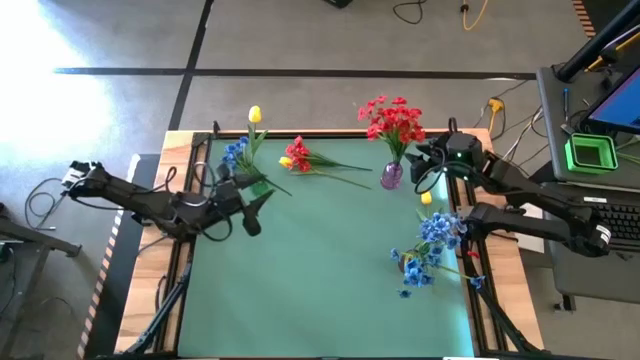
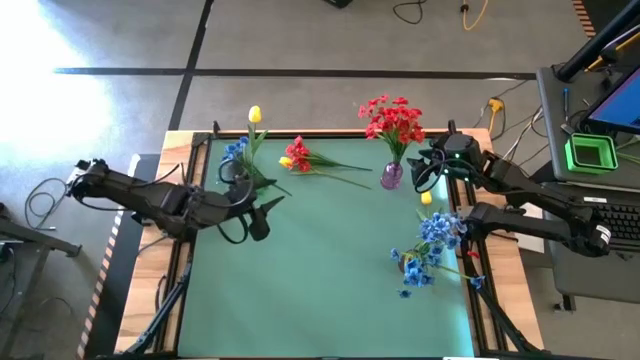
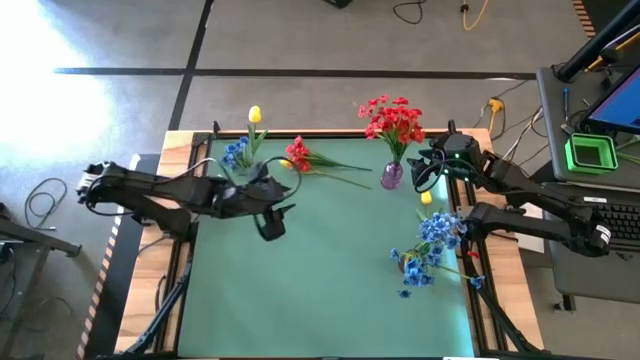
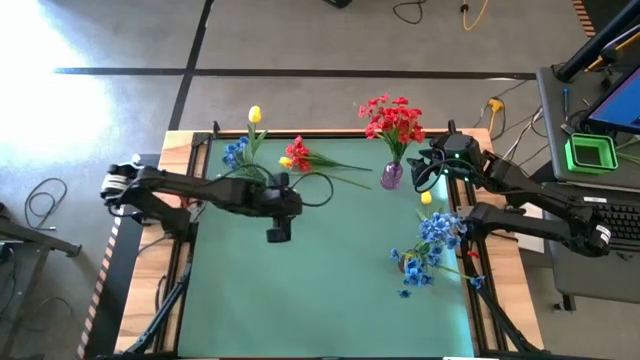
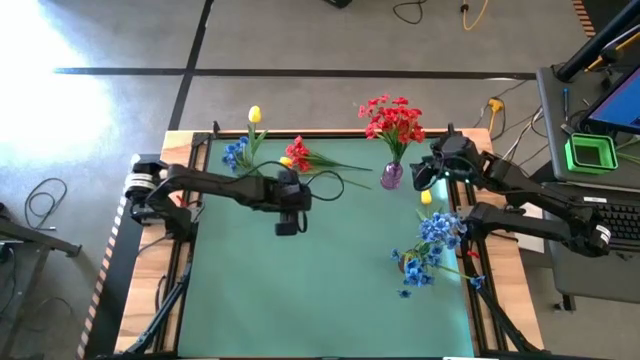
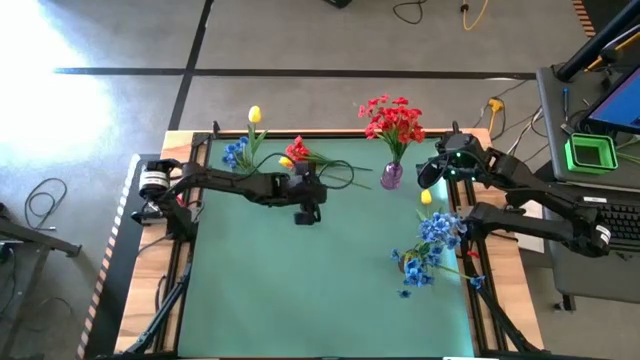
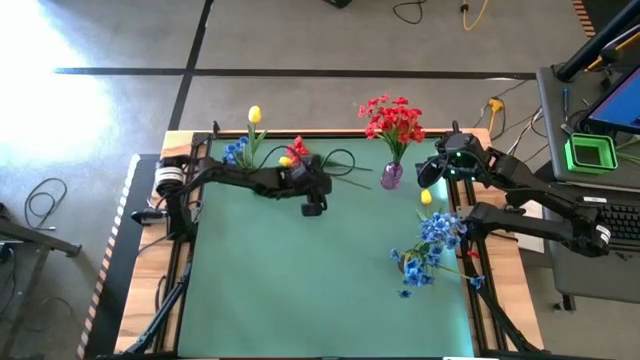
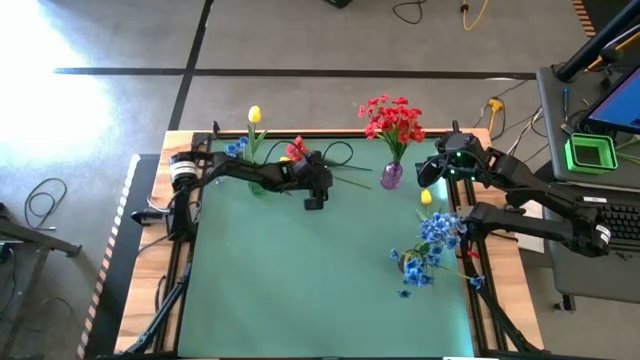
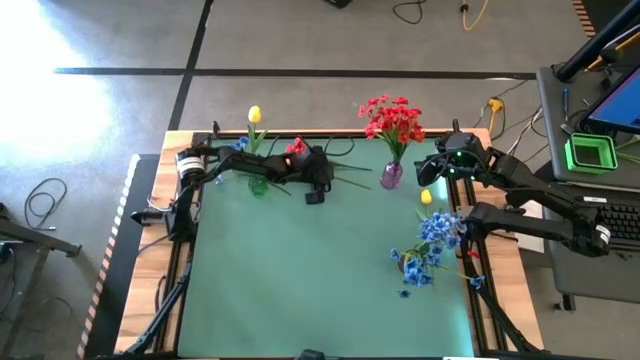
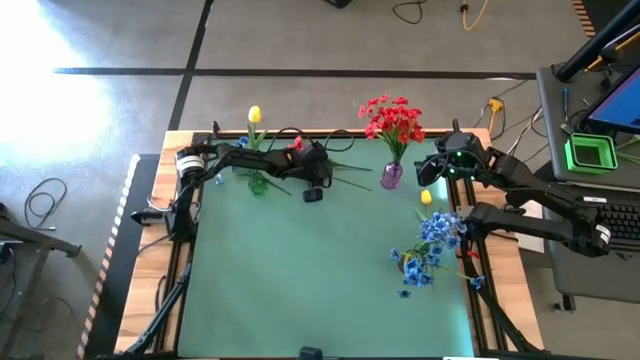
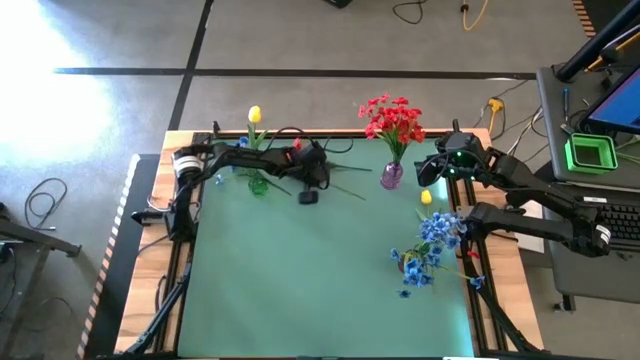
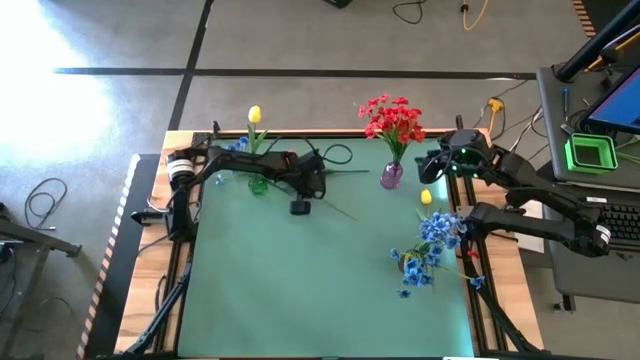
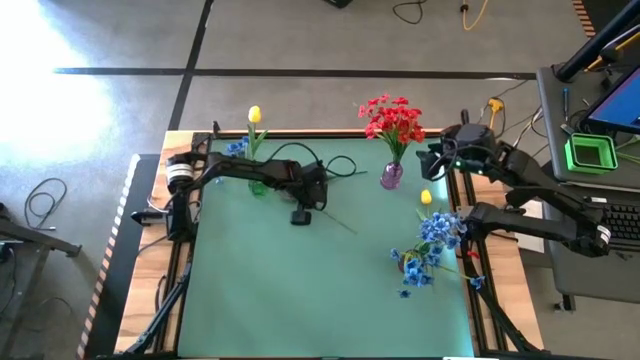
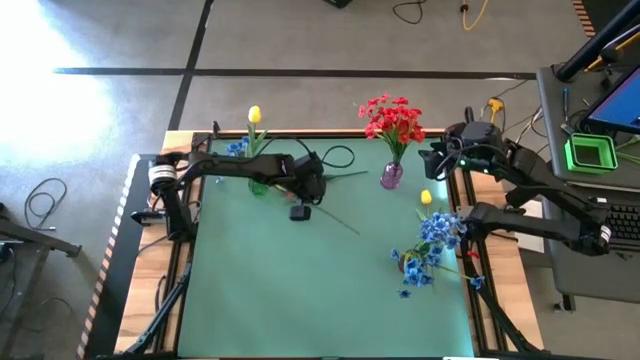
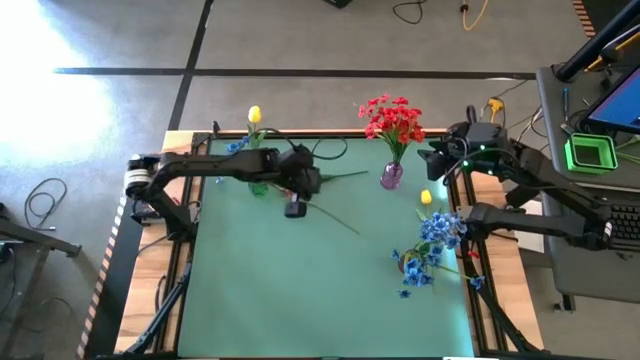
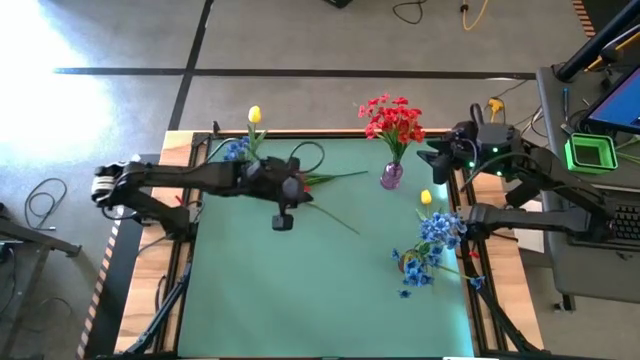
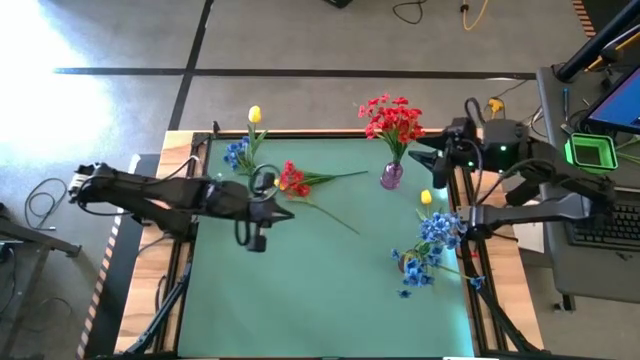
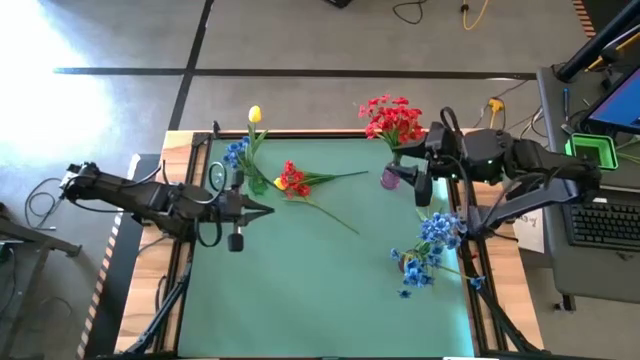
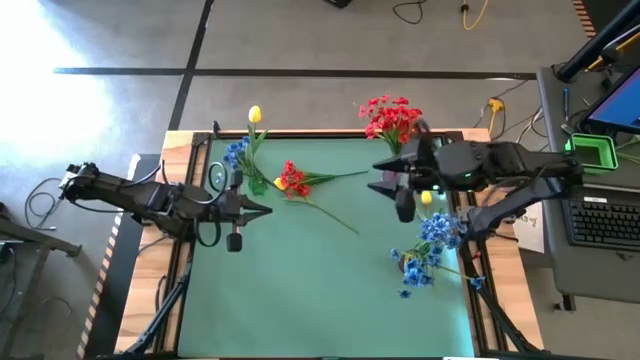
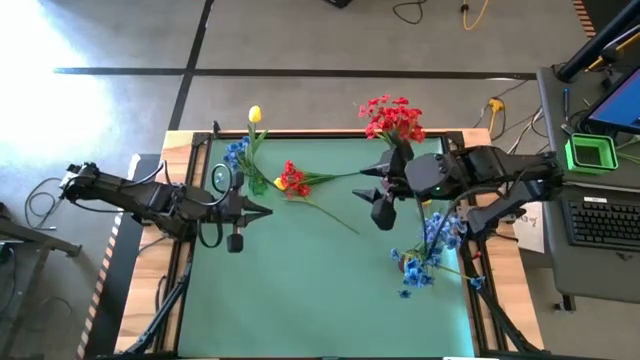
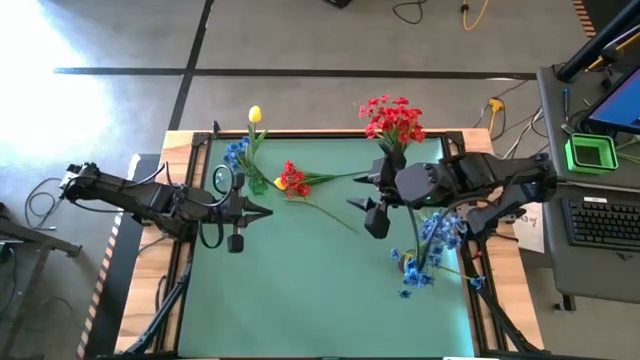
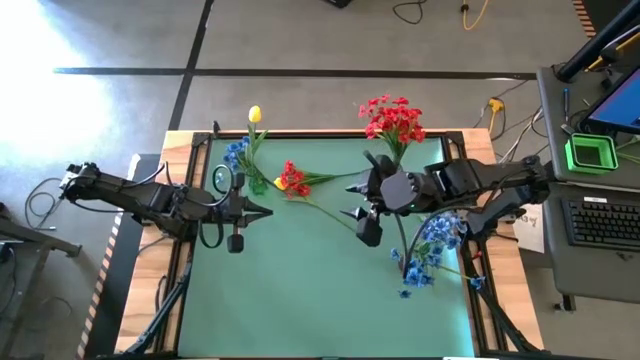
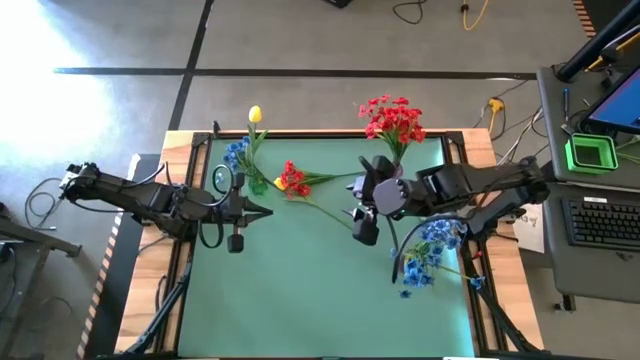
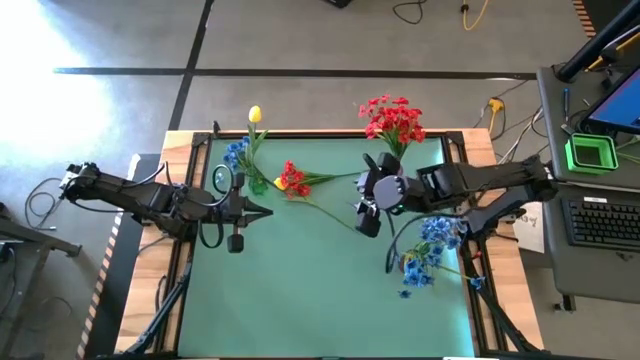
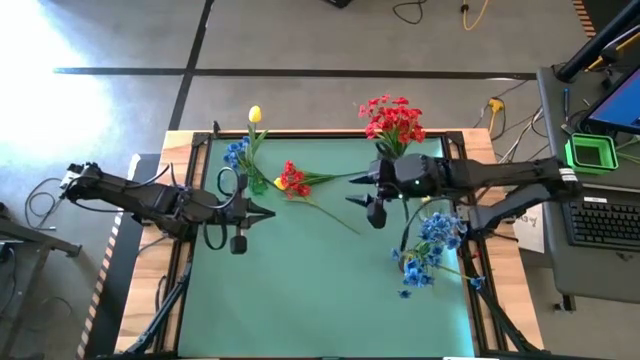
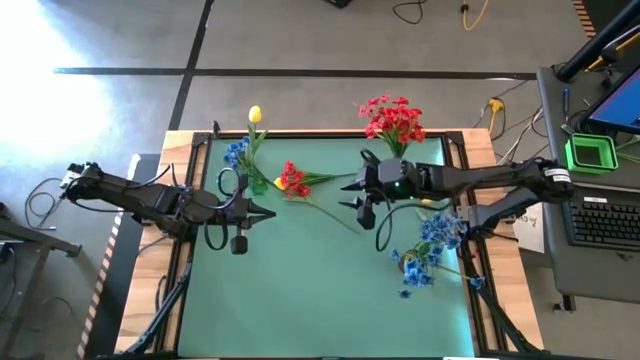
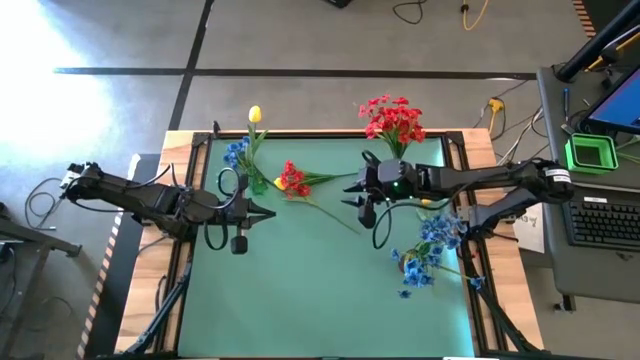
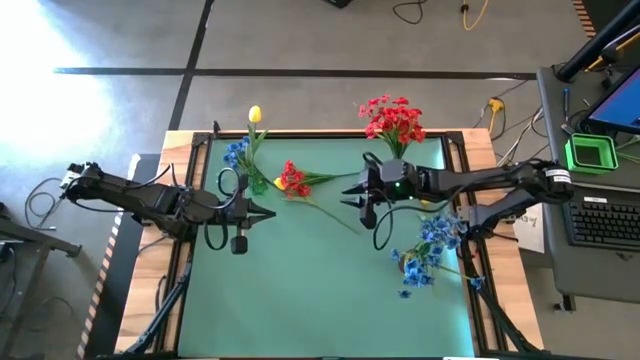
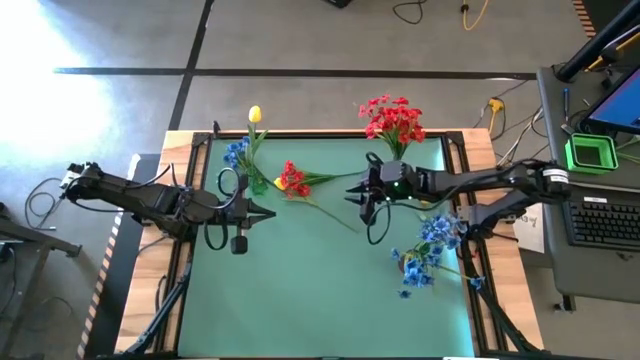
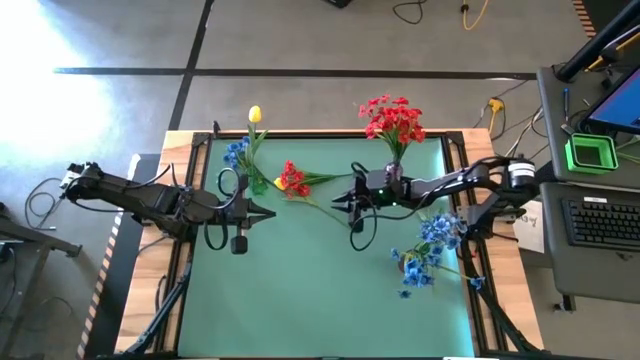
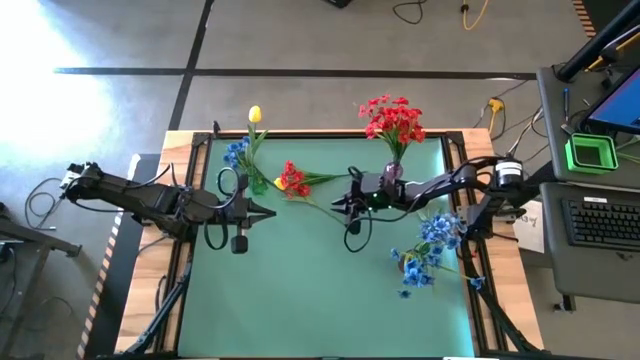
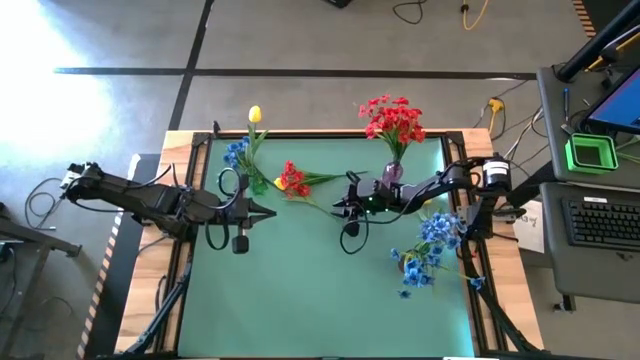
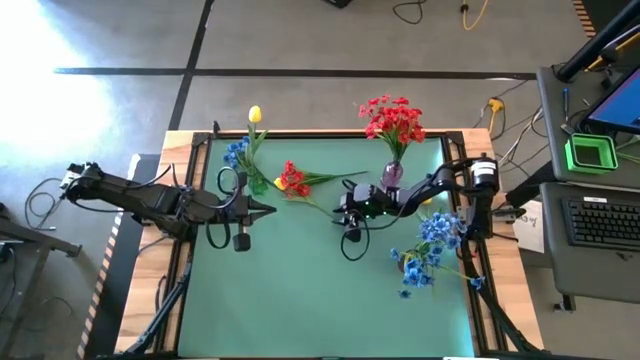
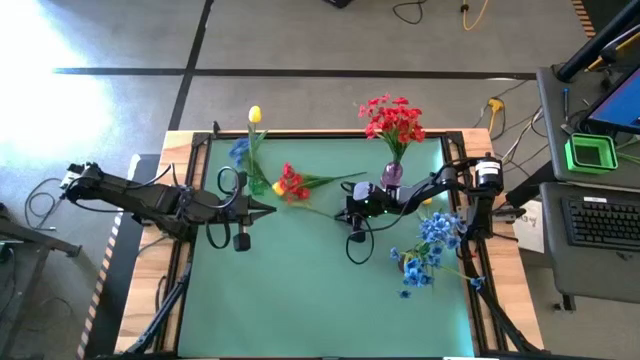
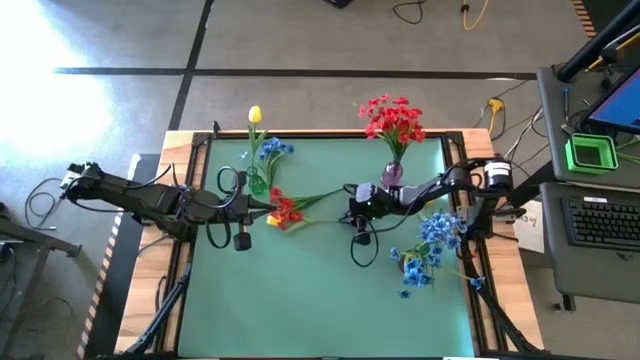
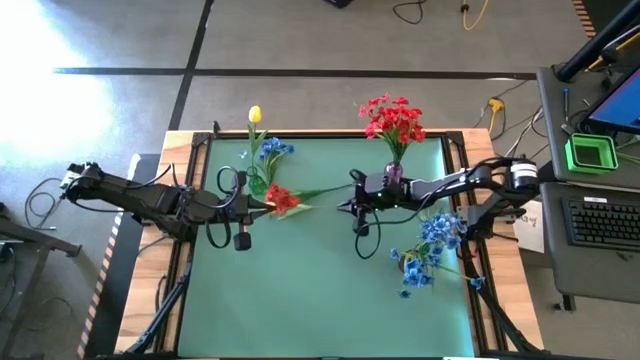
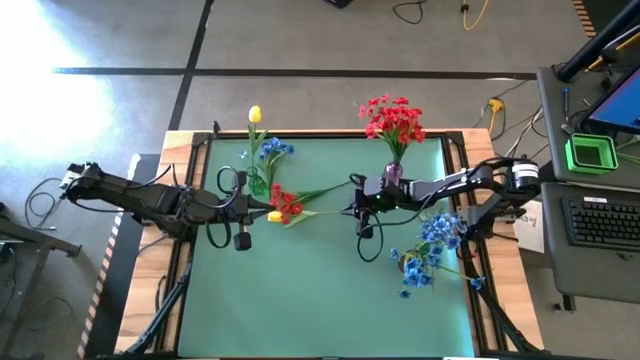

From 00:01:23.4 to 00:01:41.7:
Task: Sort flowers into vase by color
Put the left yellow tulip into the green vase

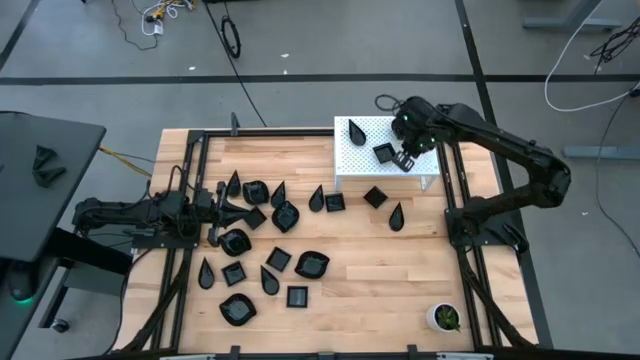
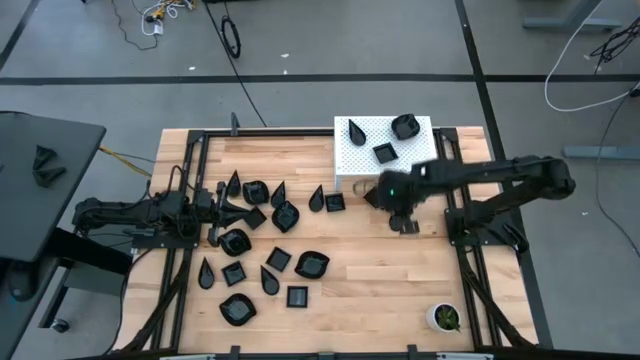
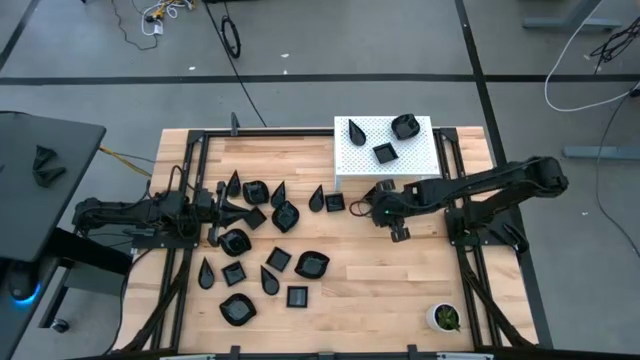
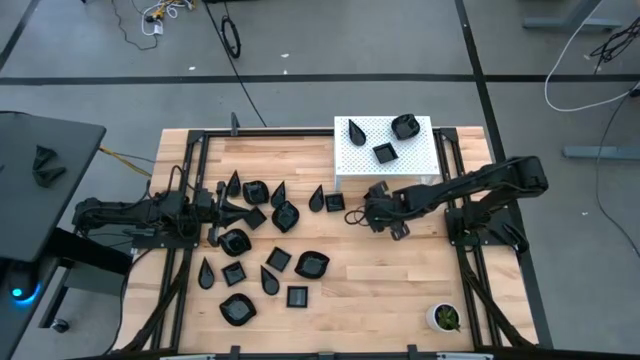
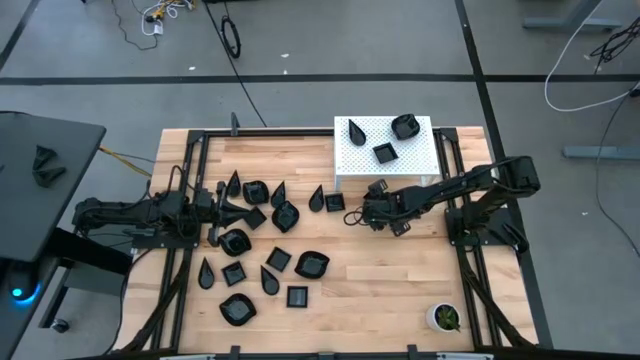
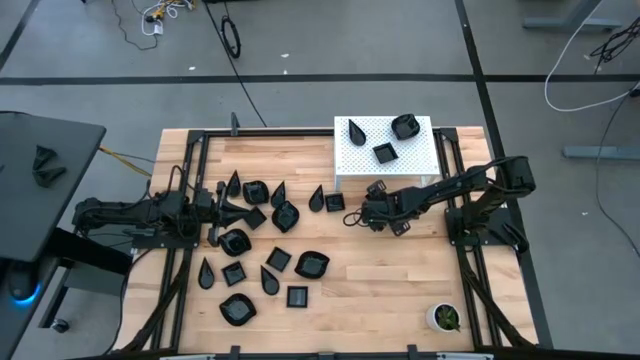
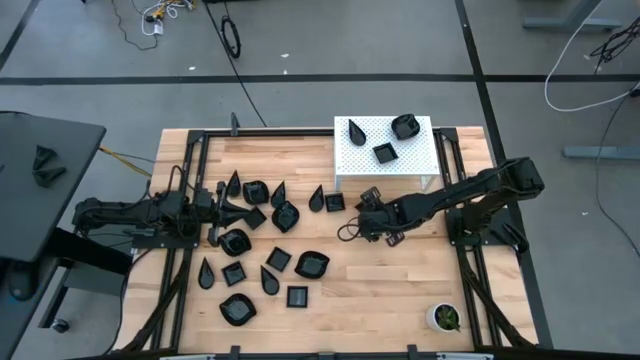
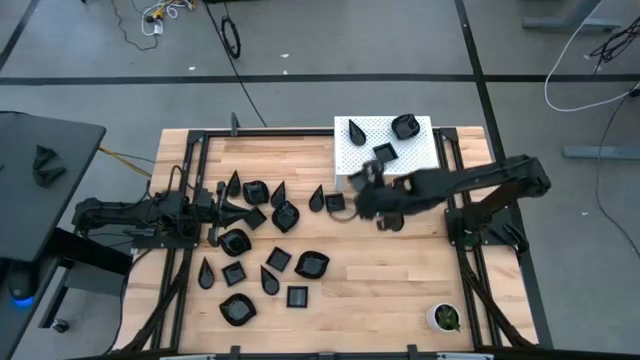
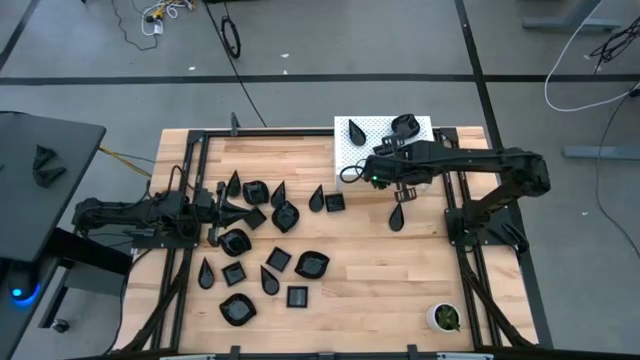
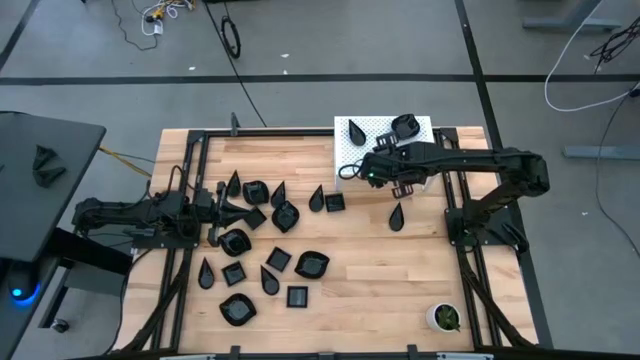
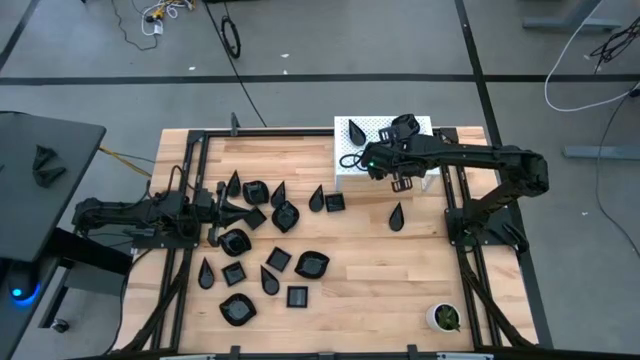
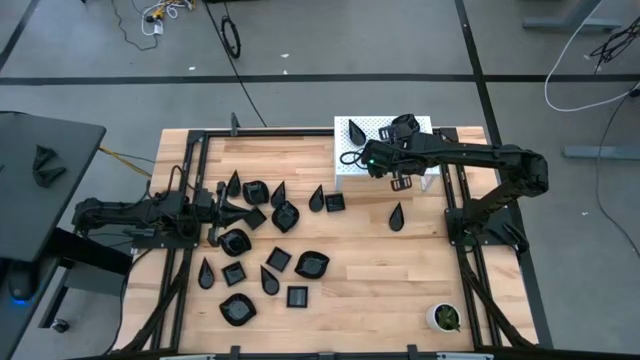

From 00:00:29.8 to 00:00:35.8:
Task: Pick & Place Mini shaped plates
Stack the black square plate on the black square plate on the shelf
